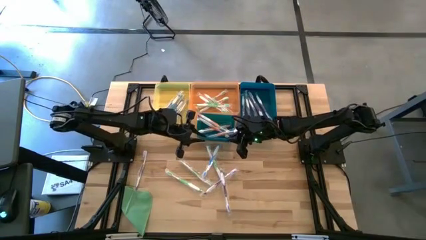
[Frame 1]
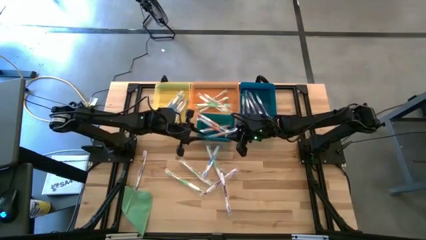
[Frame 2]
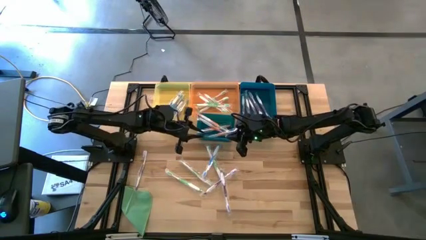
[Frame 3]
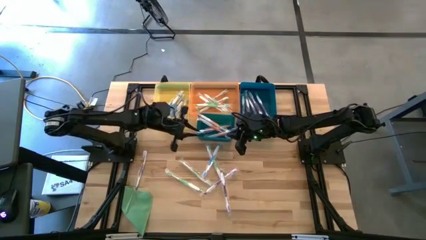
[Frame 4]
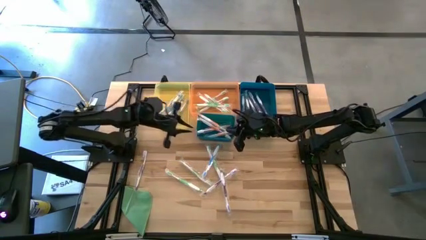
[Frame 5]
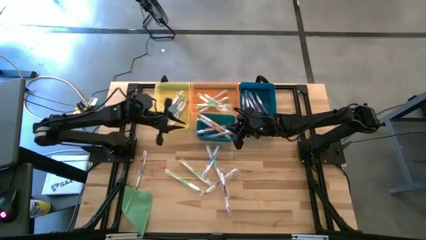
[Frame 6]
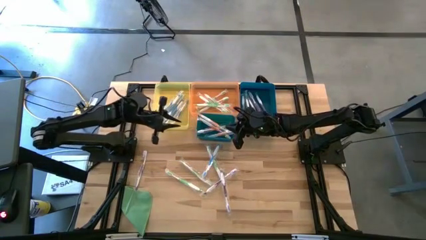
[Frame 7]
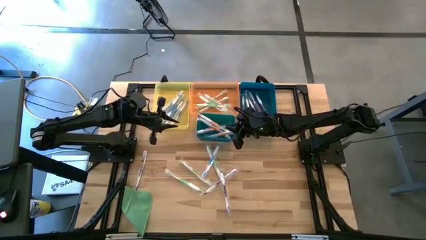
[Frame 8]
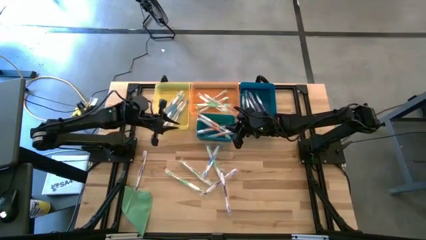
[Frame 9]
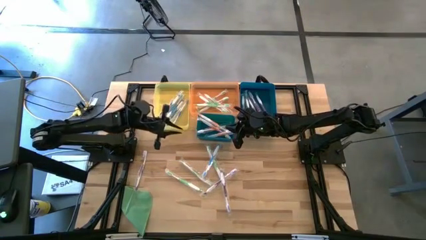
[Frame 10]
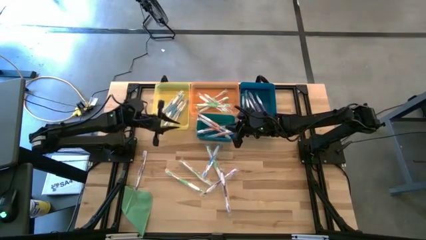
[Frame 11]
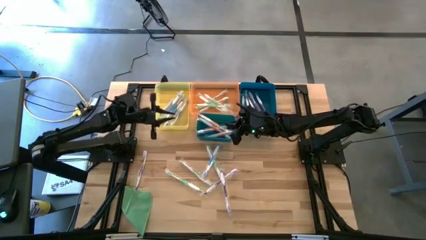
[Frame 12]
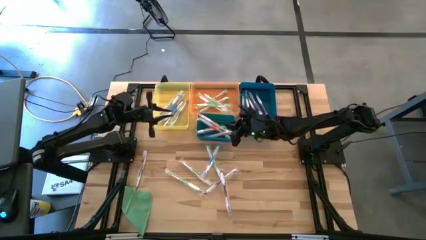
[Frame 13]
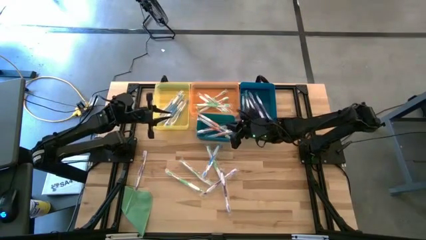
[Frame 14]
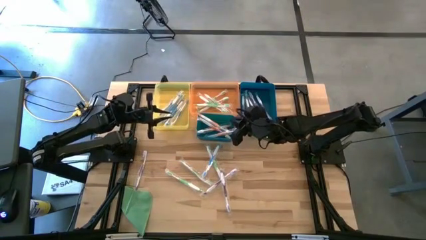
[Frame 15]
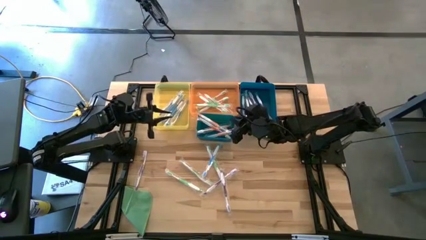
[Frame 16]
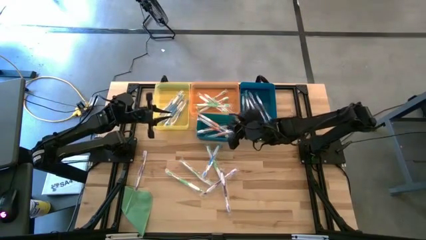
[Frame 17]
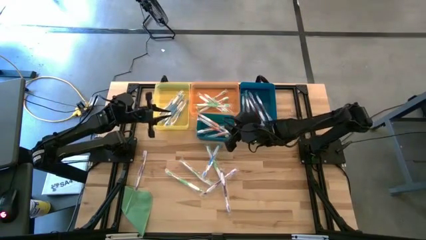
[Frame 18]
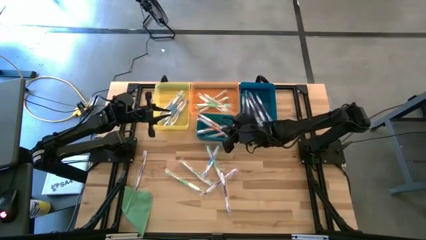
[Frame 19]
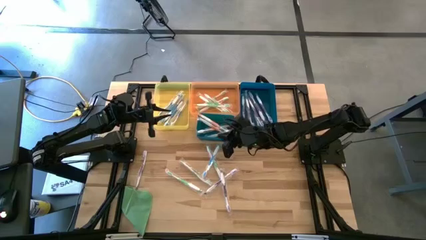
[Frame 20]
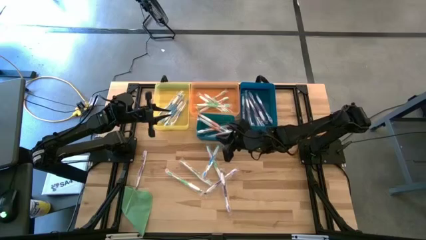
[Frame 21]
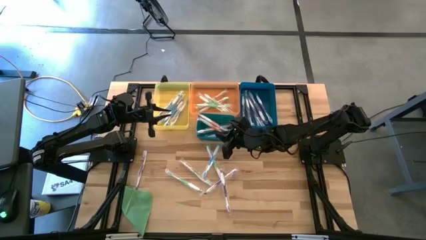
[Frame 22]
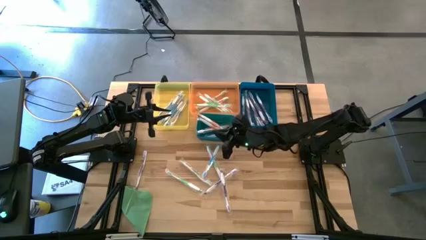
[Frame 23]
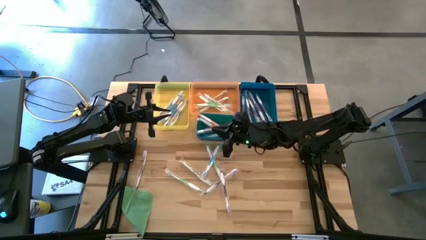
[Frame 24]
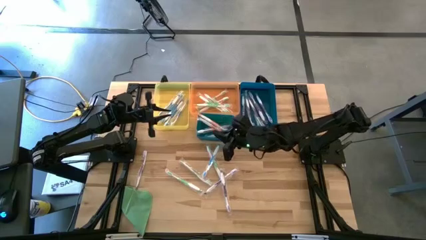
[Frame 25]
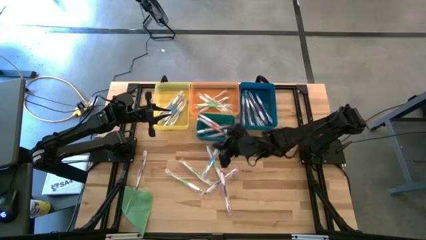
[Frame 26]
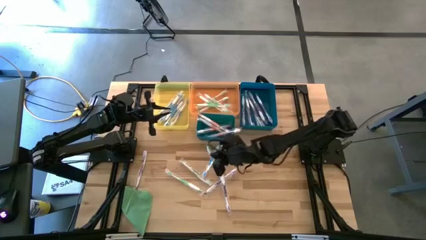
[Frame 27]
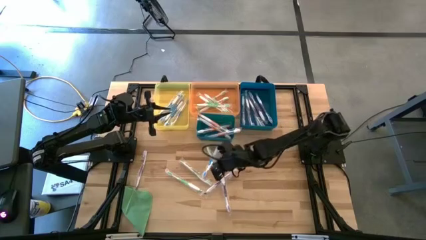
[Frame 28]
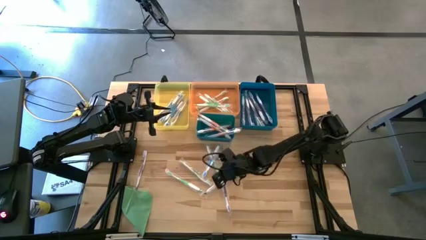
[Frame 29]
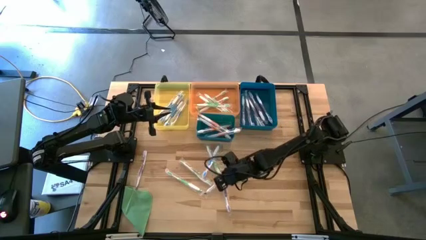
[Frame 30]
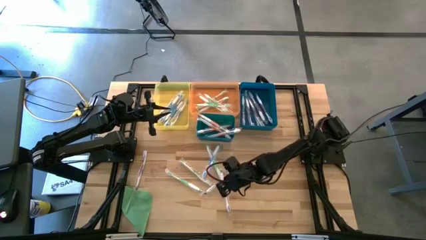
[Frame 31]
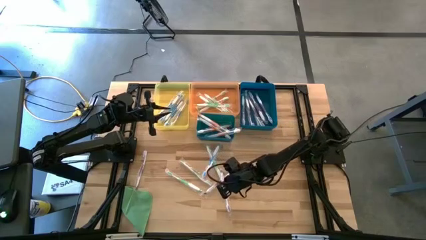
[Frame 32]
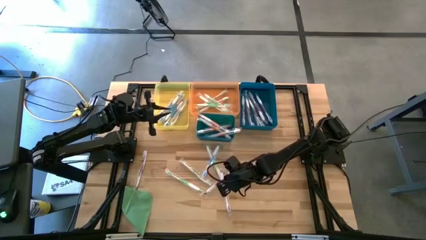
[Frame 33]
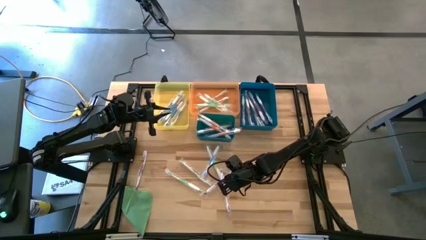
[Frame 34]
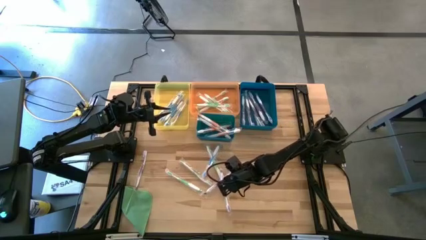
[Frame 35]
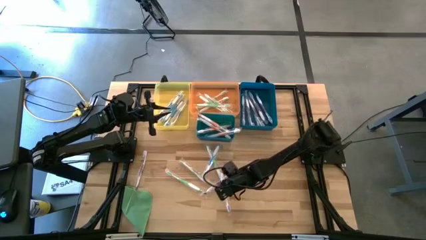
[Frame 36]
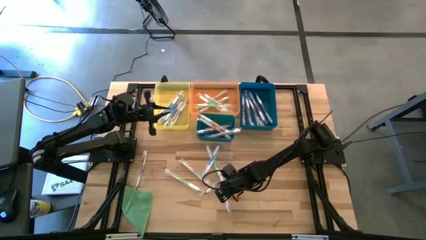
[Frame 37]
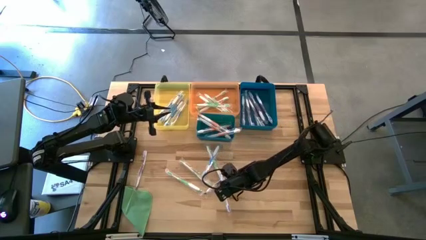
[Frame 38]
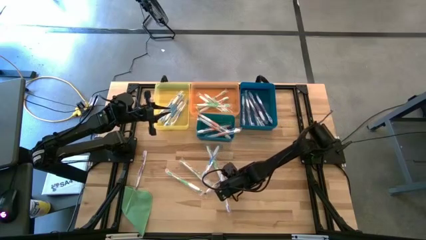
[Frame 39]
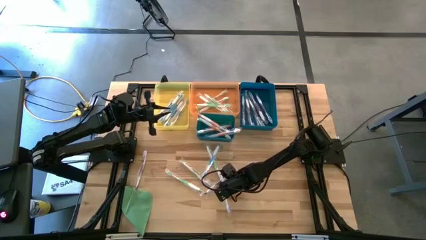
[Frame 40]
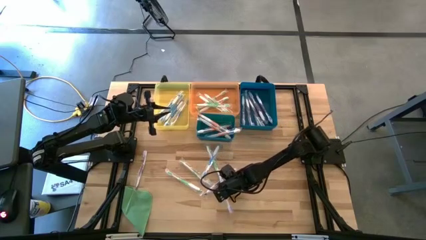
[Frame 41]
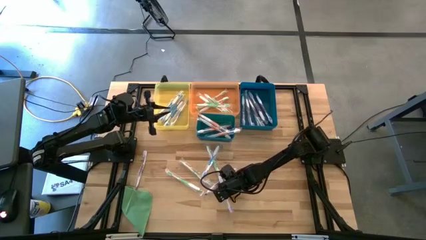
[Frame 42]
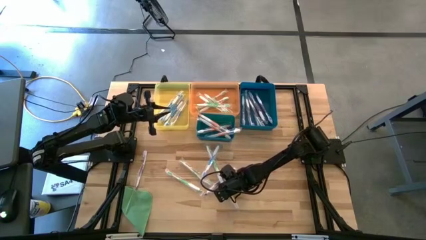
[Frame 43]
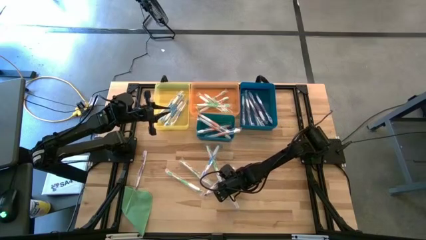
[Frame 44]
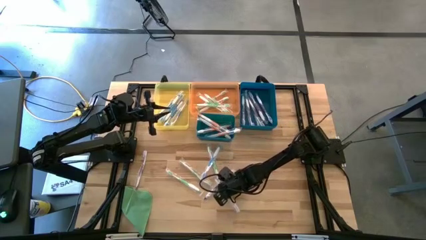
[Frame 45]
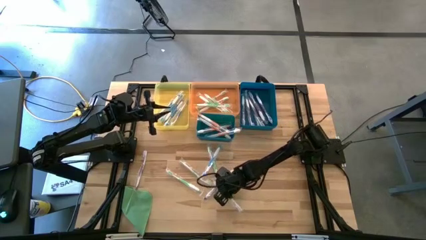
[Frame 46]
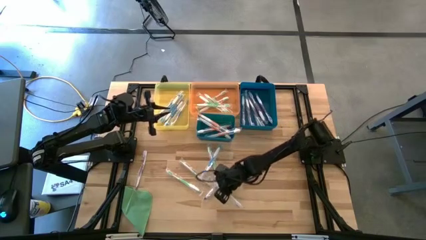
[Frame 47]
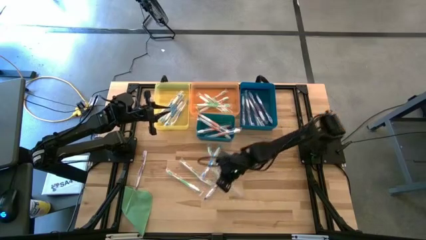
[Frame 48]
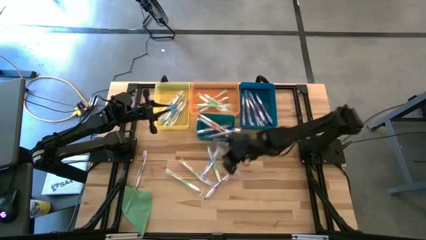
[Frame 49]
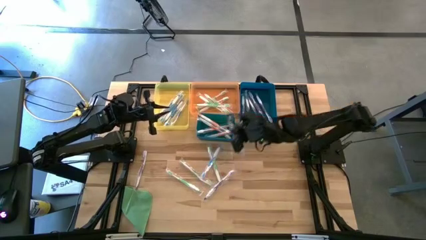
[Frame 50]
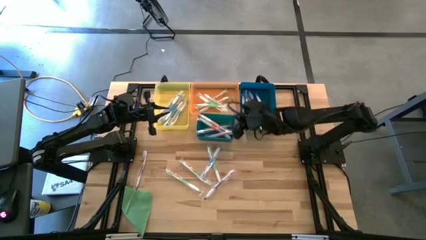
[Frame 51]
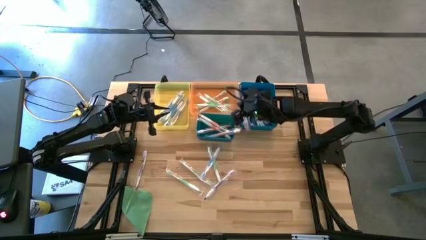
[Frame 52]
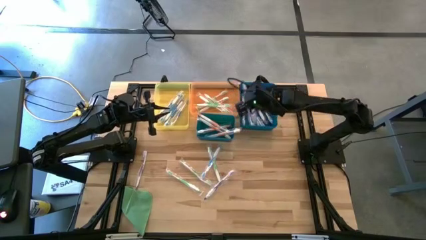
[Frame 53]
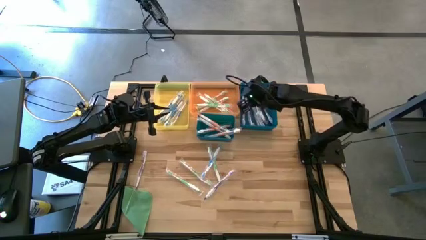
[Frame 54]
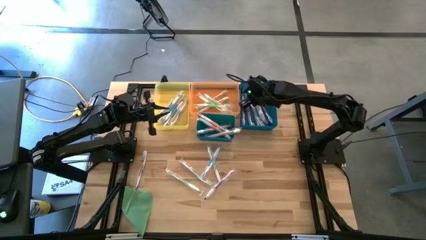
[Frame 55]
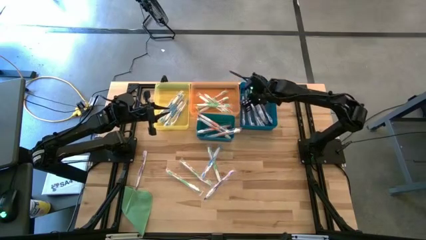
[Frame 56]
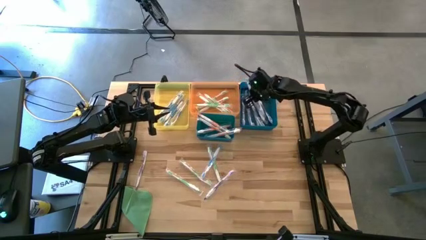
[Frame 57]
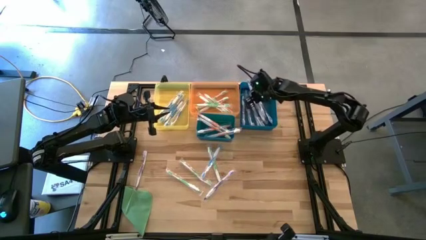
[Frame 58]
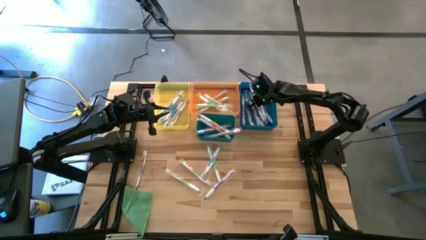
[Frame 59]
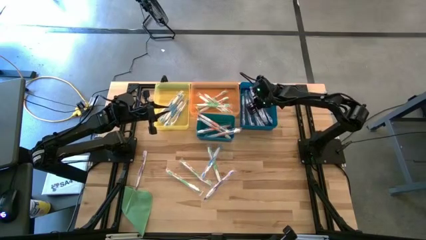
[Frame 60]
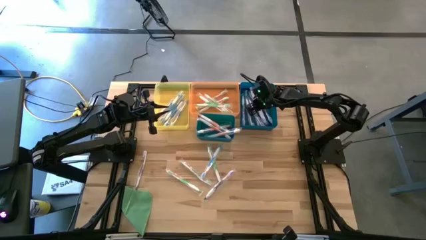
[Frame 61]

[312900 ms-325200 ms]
Task: Pick & Place Toothbrushes
Put the purple toothbrush into the blue bin
